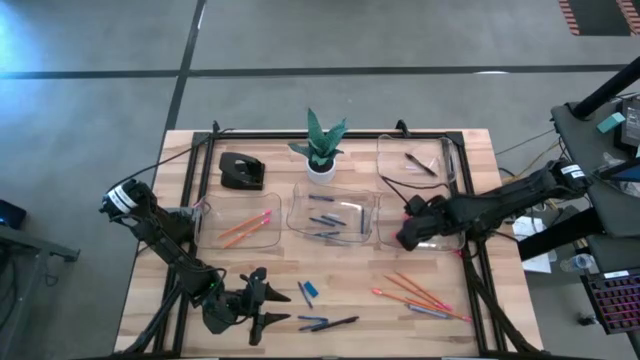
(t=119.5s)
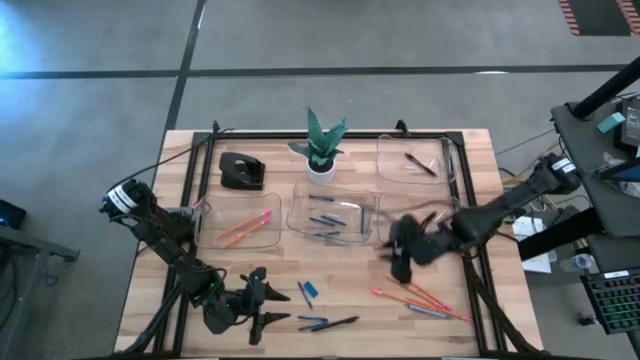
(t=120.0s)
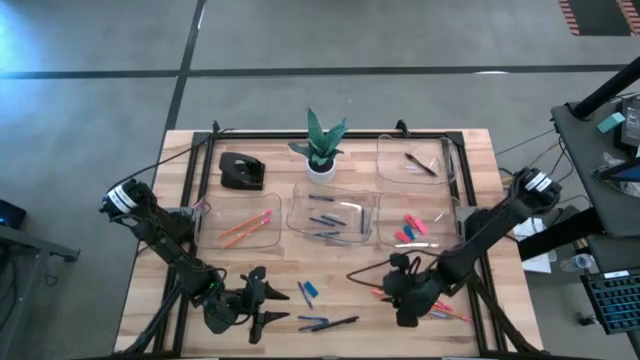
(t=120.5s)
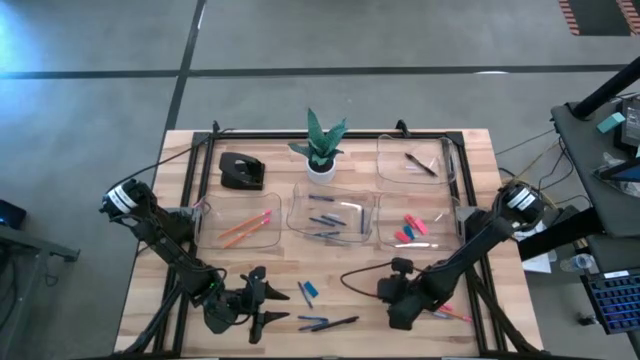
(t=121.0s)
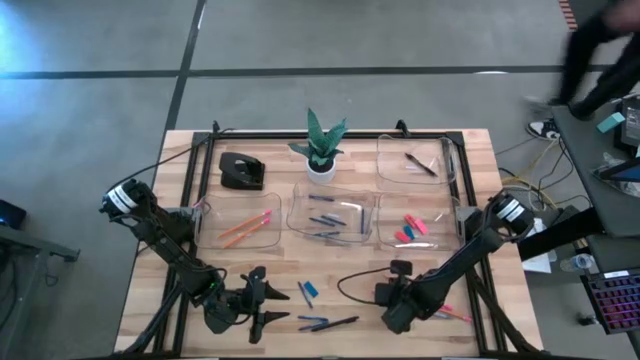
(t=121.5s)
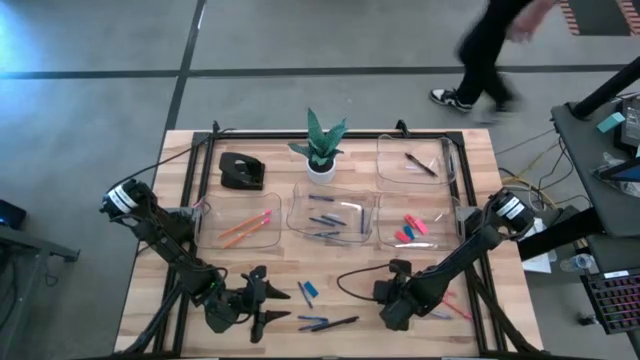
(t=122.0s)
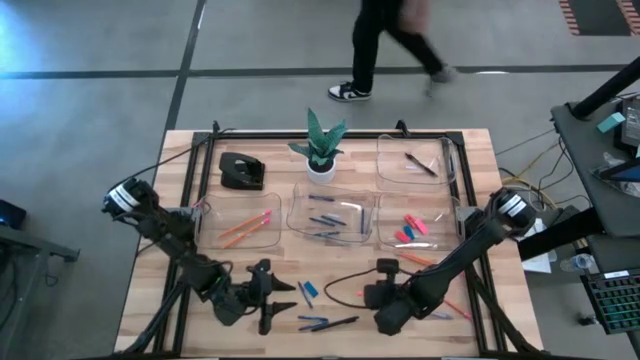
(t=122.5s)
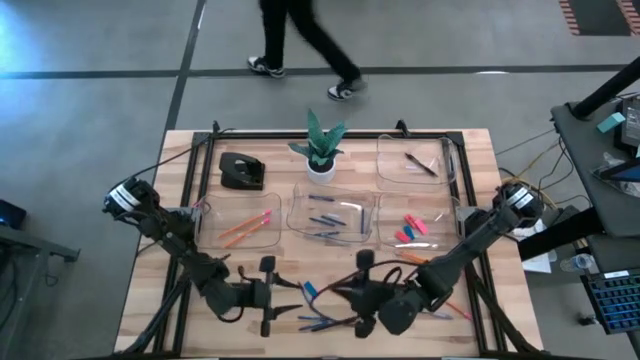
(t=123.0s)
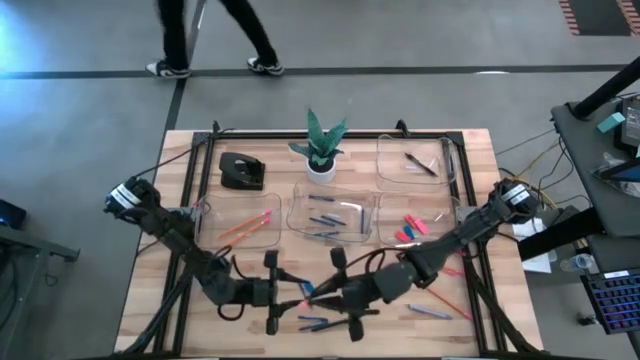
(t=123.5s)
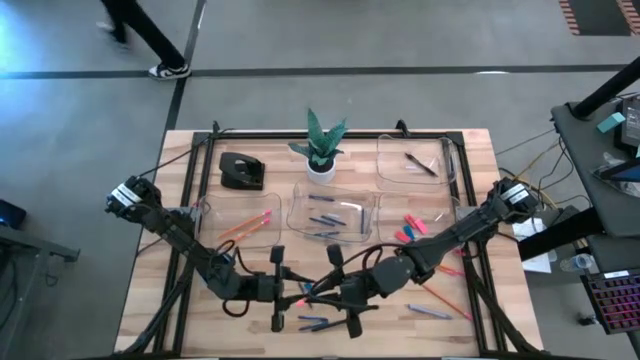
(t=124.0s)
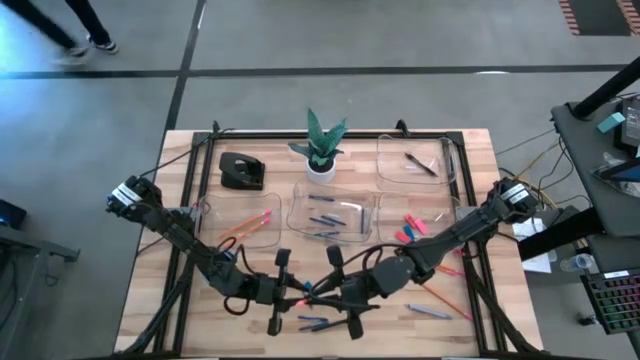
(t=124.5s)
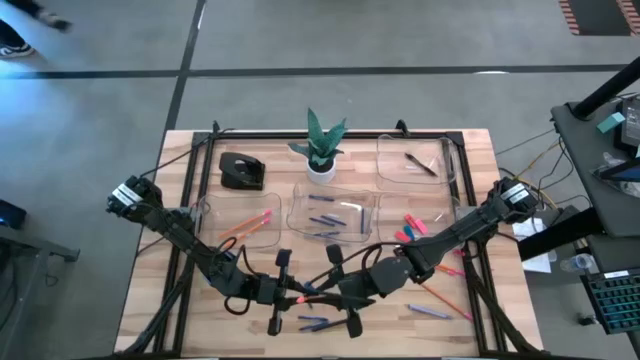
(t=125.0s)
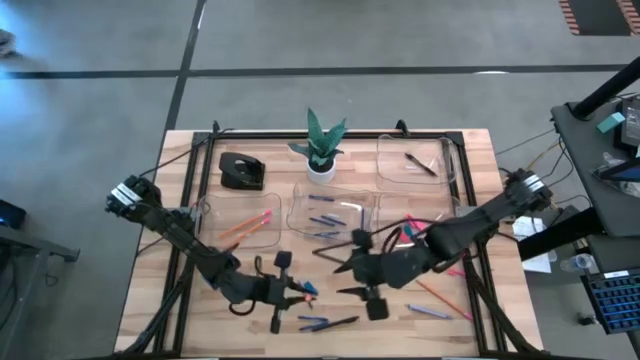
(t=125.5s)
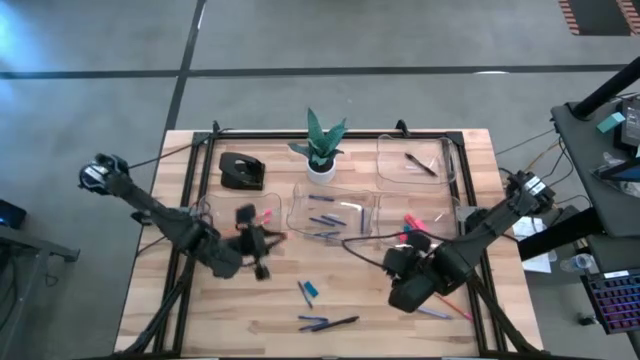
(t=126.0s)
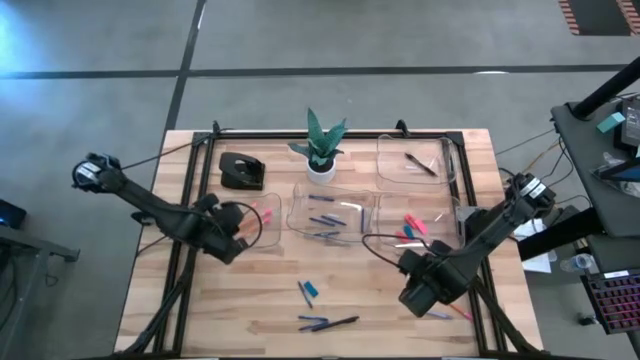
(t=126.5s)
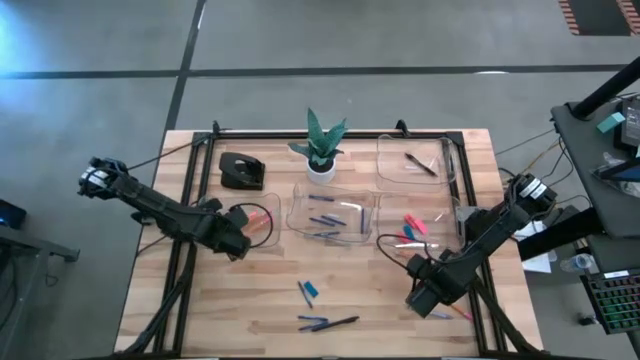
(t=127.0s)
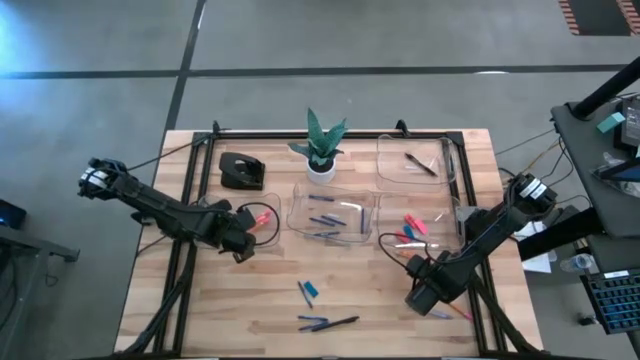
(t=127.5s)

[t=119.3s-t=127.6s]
Task: Sort crayons/erasers/pens/pencils in bins
Put the orange pencil into the middle left transparent bin

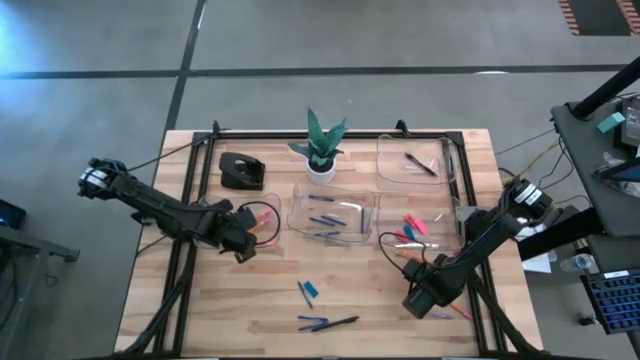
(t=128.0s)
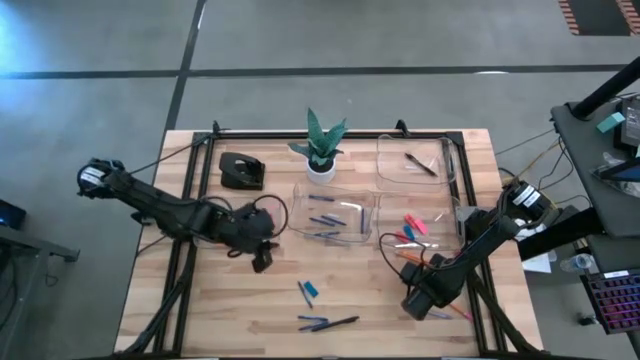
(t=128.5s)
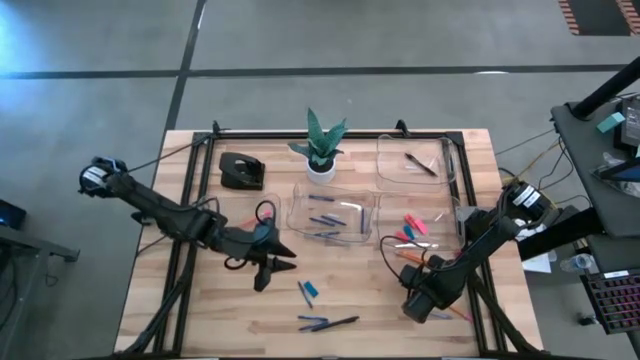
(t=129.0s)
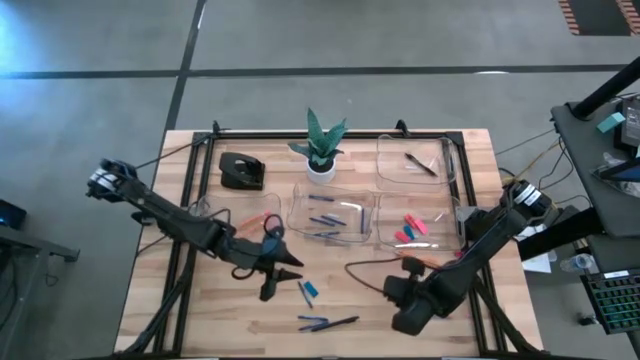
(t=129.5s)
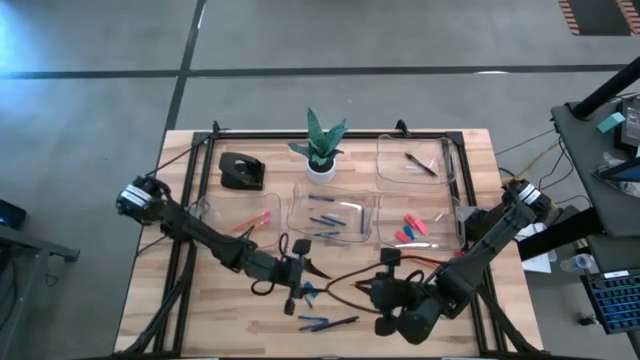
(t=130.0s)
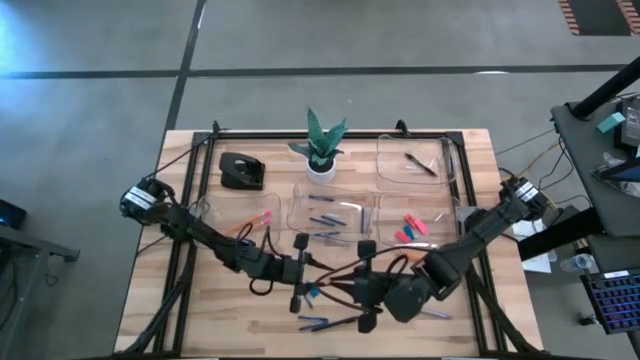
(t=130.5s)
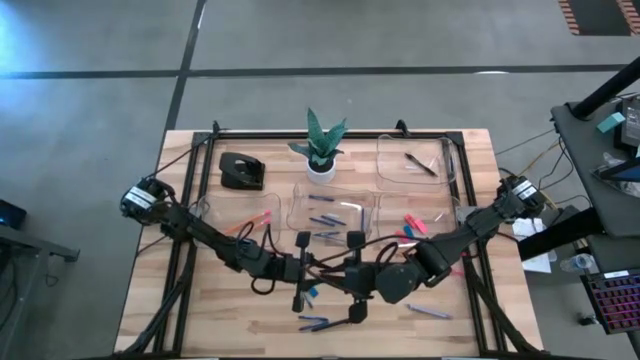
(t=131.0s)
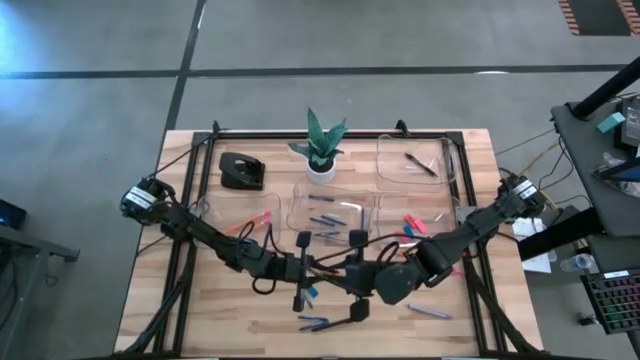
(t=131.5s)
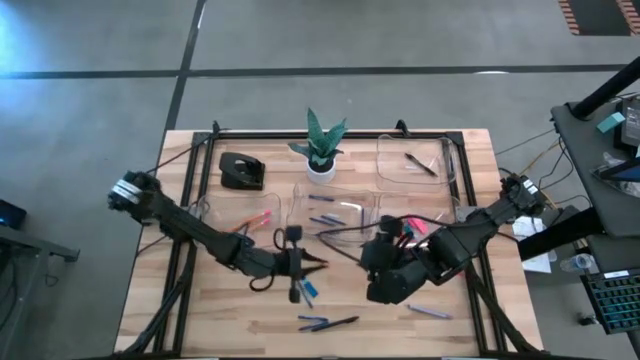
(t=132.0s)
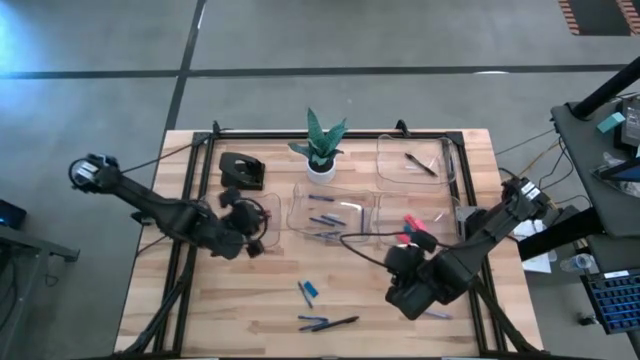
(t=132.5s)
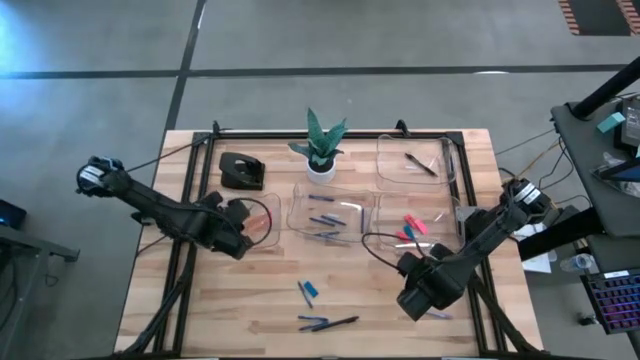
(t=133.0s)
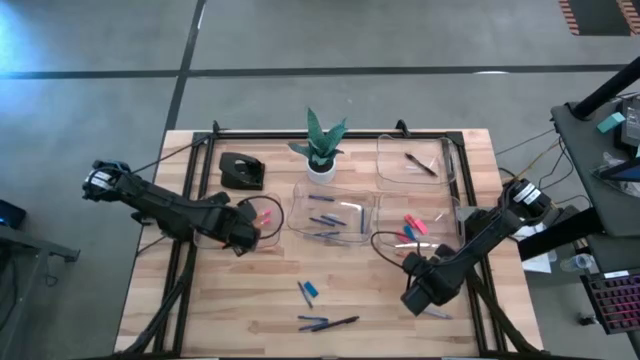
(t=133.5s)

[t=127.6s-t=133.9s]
Put the orange pencil into the middle left transparent bin

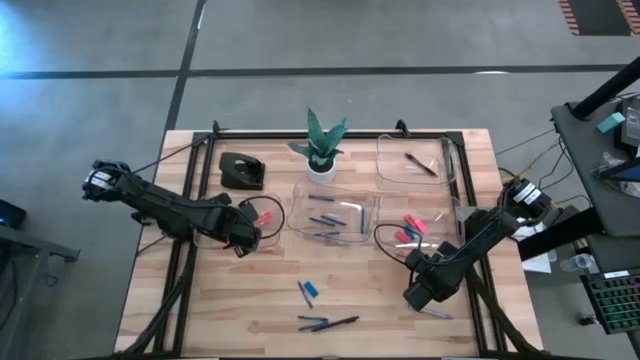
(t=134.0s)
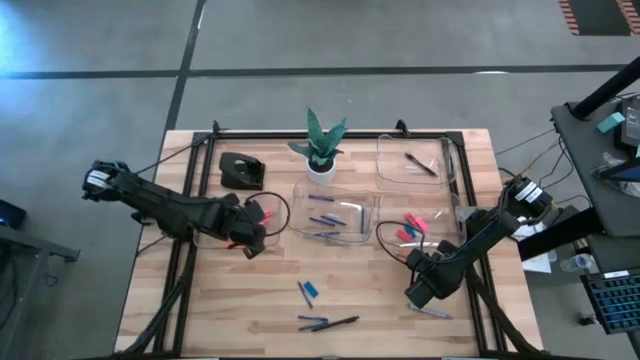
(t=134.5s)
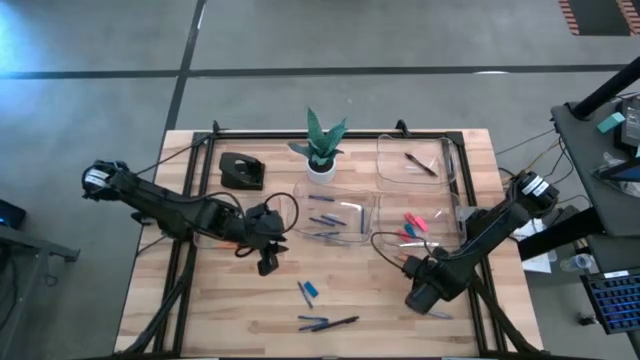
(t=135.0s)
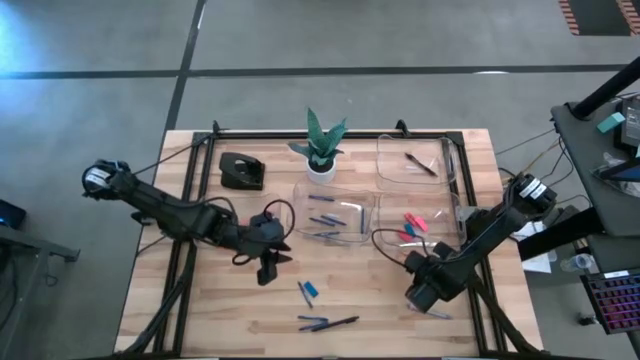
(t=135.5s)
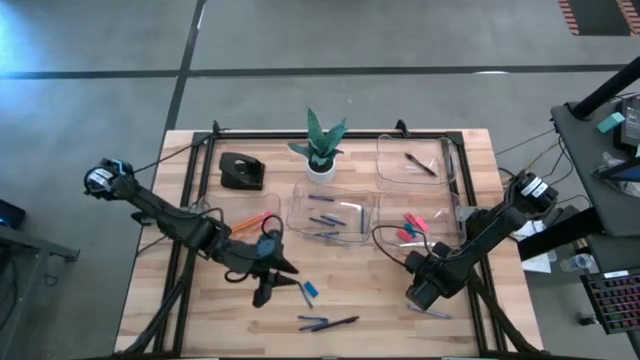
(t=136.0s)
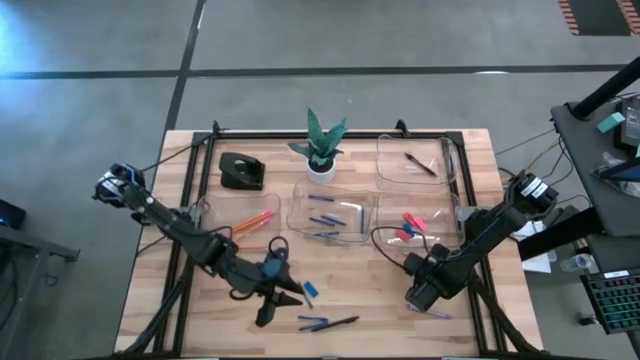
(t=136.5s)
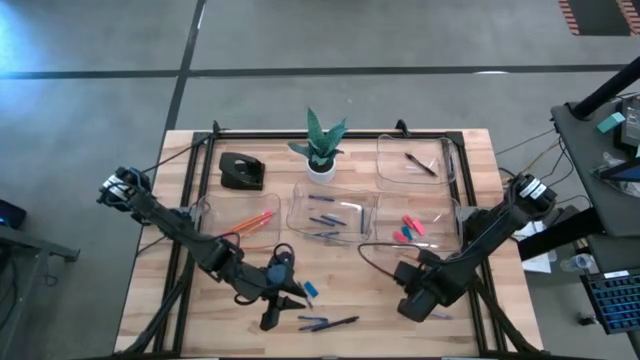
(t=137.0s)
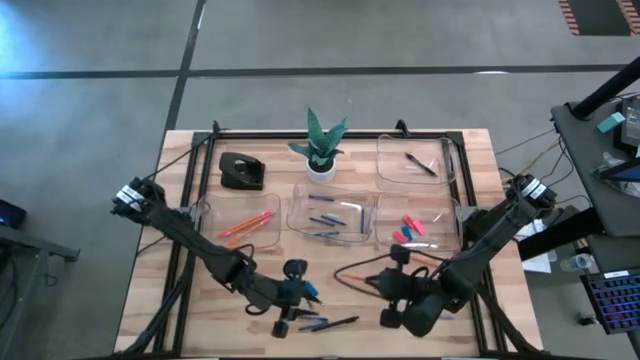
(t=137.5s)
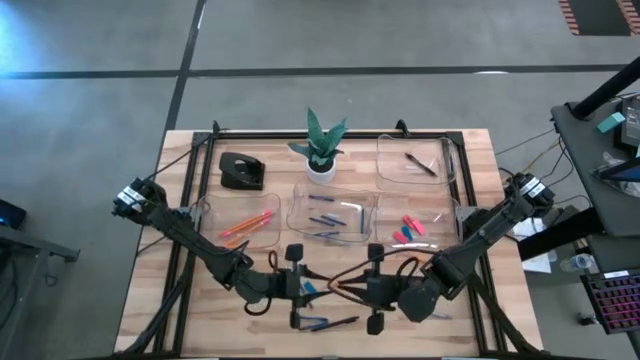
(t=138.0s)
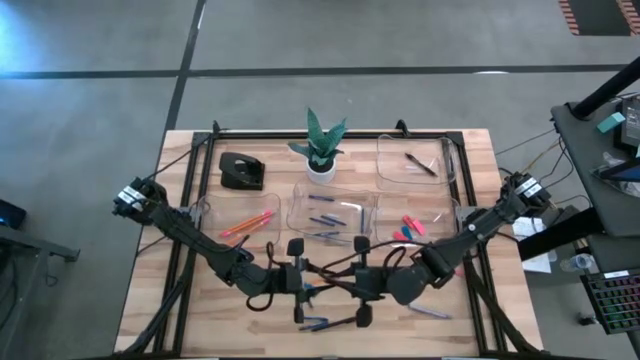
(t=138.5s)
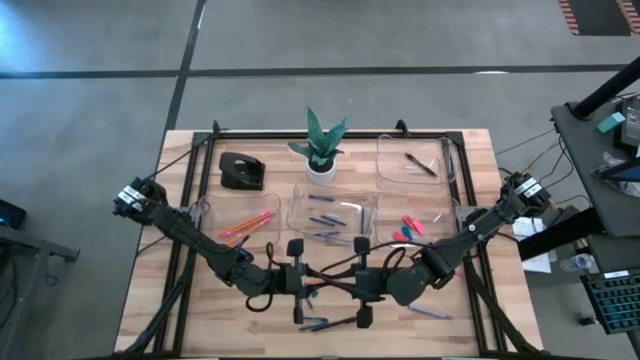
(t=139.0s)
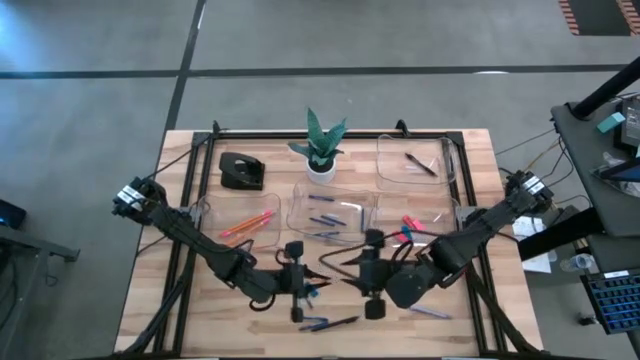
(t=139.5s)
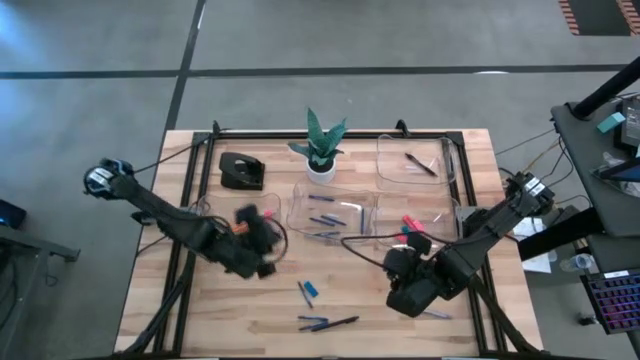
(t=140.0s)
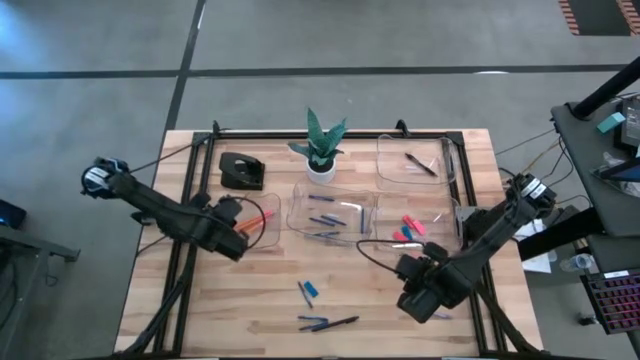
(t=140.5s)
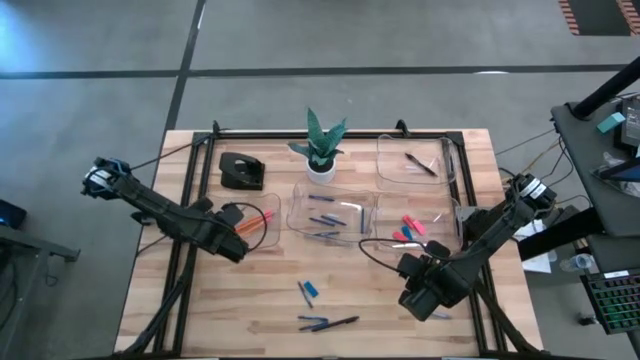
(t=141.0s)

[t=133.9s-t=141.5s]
Put the orange pencil into the middle left transparent bin

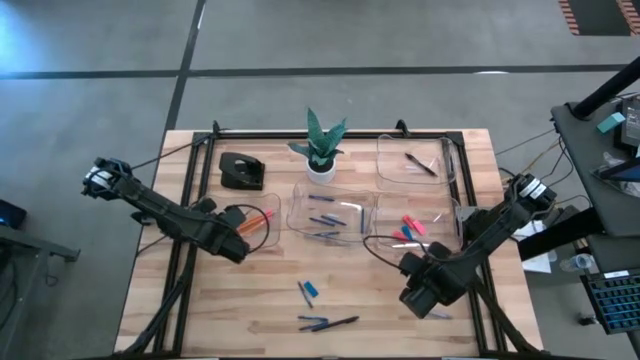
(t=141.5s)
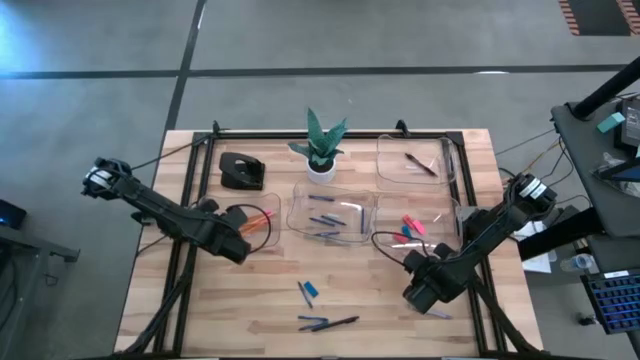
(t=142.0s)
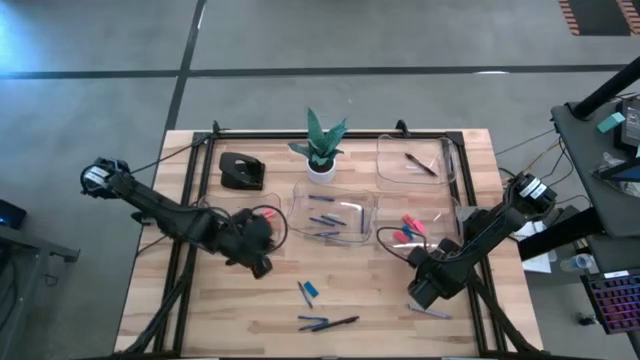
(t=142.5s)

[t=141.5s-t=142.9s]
Put the orange pencil into the middle left transparent bin
